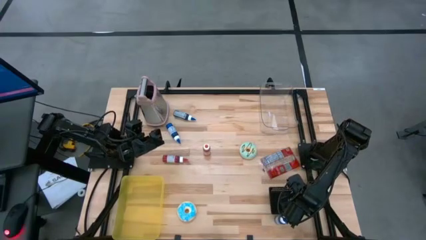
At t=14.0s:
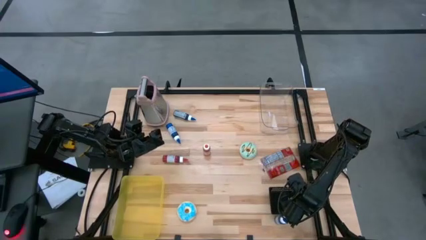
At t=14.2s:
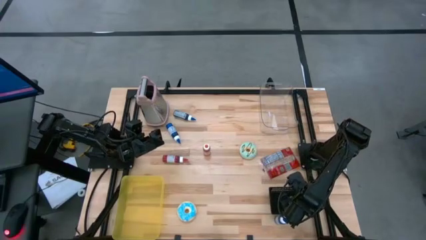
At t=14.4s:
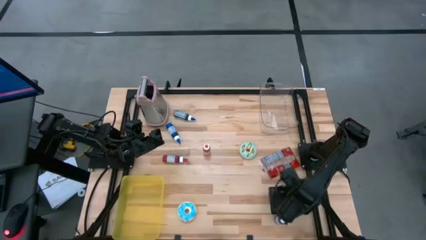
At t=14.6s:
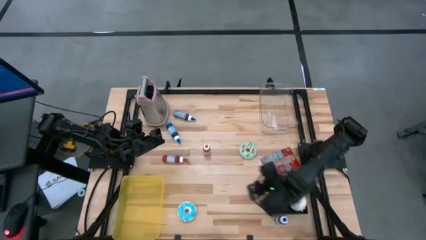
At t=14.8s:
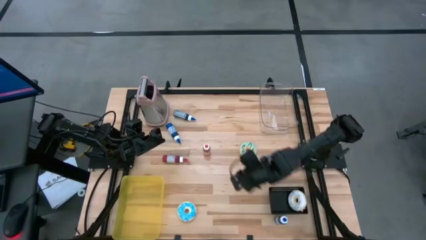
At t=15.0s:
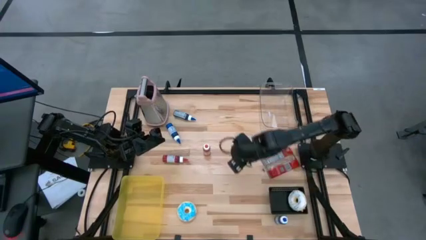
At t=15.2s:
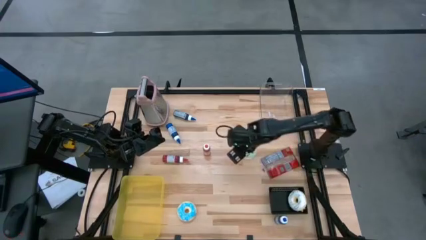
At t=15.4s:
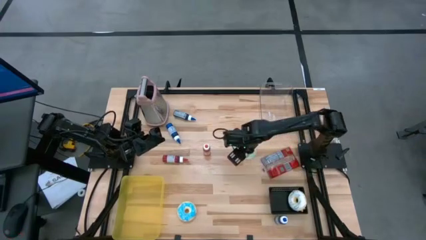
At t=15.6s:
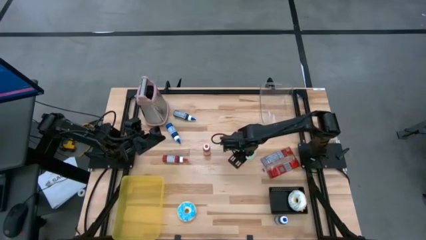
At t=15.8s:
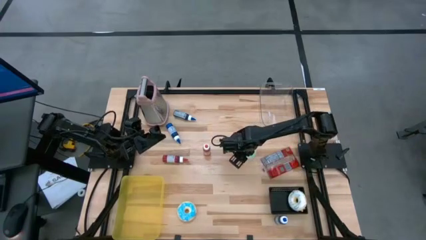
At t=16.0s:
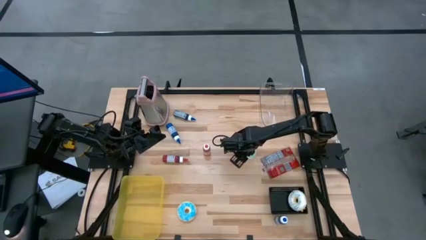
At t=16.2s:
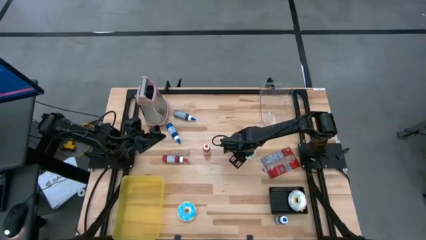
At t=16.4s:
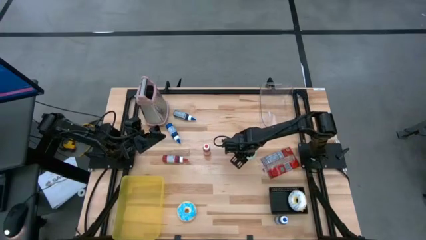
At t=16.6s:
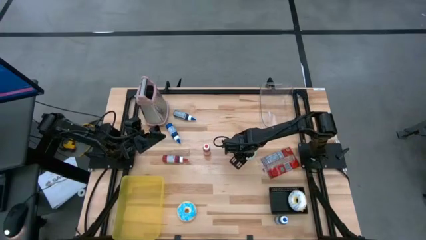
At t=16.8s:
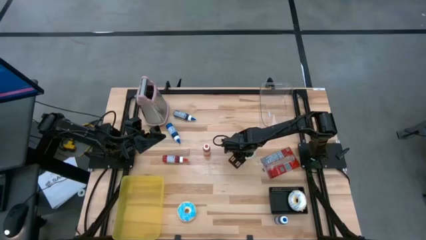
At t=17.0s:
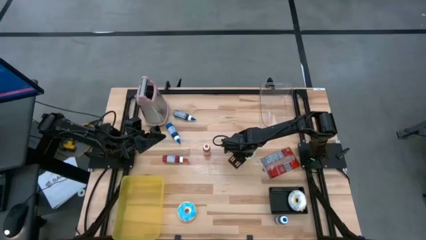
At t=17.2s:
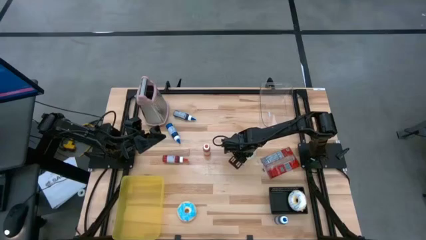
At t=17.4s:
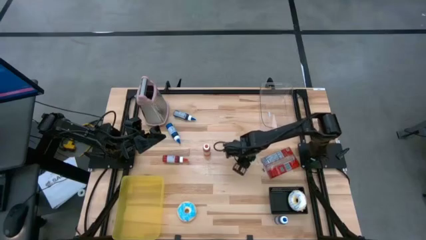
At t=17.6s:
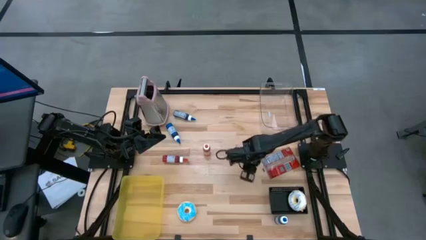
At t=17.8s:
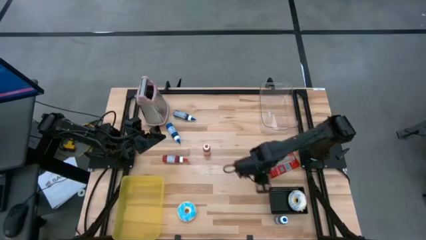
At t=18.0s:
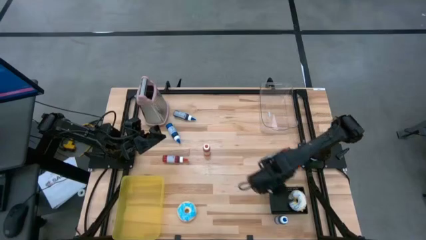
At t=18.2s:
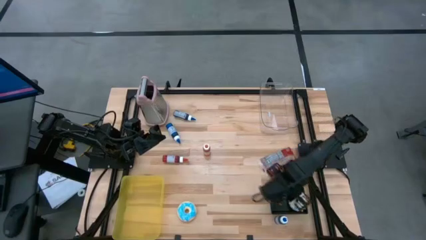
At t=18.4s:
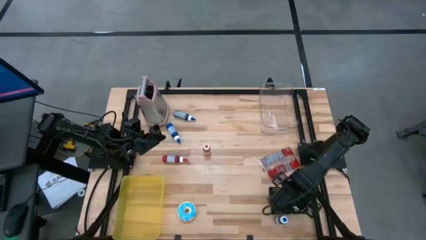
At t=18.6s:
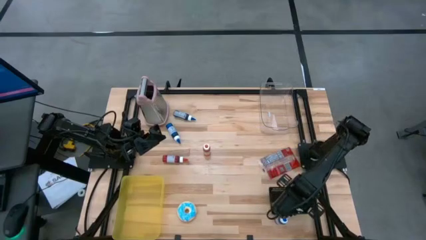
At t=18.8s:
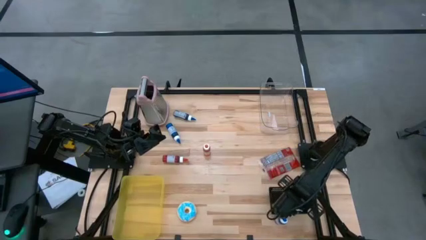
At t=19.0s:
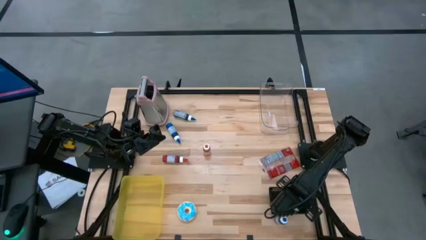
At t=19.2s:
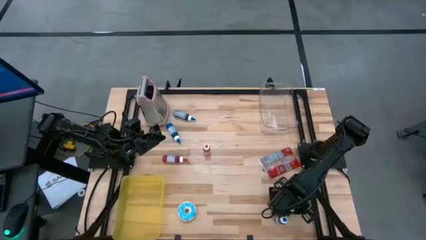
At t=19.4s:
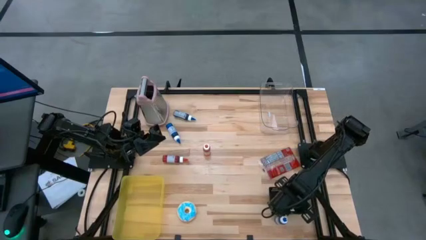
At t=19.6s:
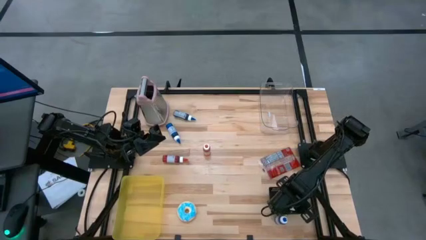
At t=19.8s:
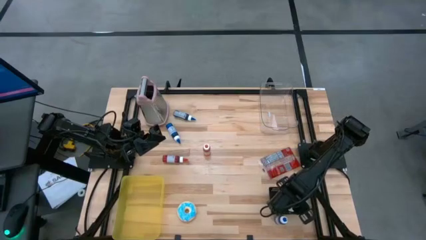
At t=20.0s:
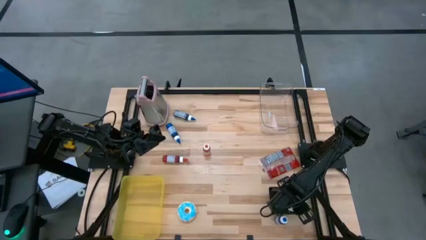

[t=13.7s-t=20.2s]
Put the green donut into the black bin

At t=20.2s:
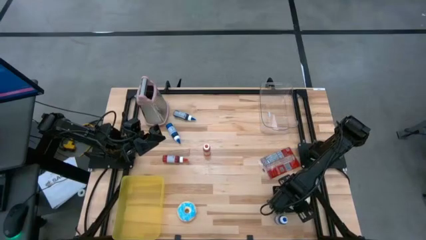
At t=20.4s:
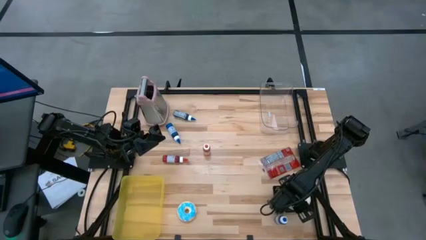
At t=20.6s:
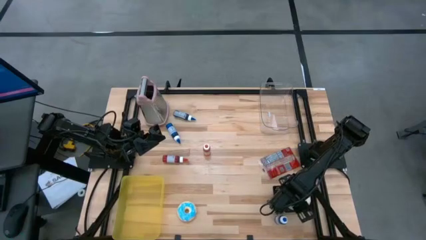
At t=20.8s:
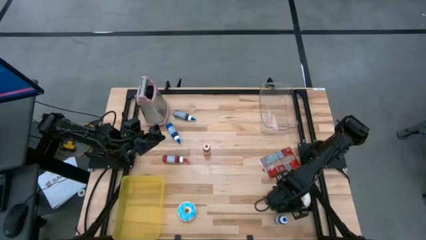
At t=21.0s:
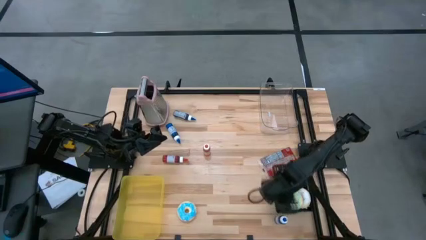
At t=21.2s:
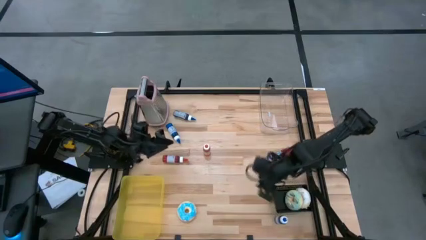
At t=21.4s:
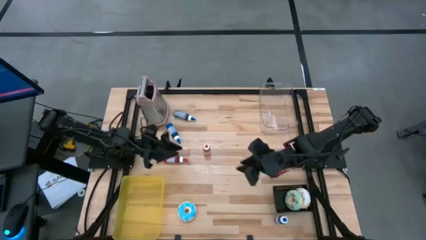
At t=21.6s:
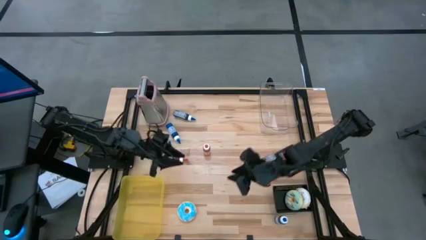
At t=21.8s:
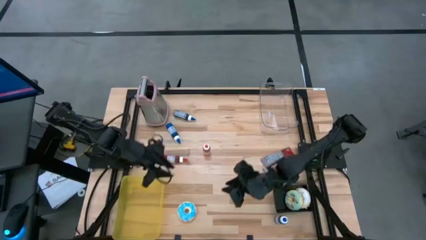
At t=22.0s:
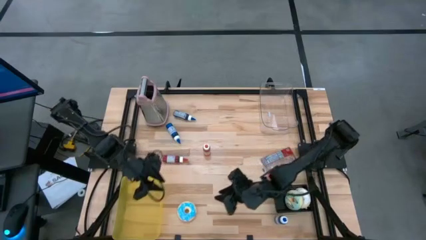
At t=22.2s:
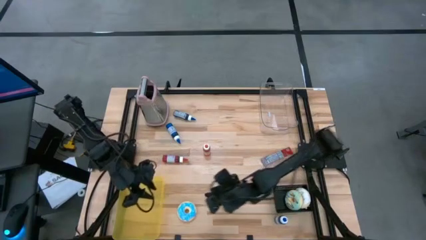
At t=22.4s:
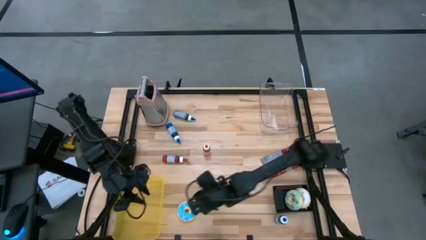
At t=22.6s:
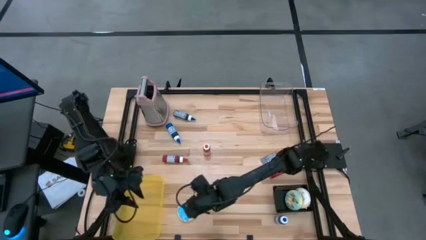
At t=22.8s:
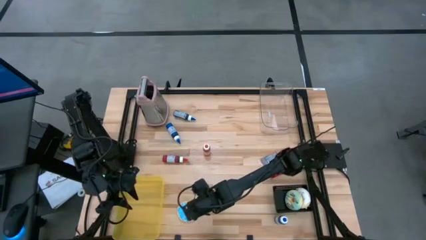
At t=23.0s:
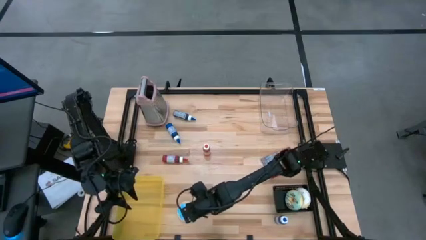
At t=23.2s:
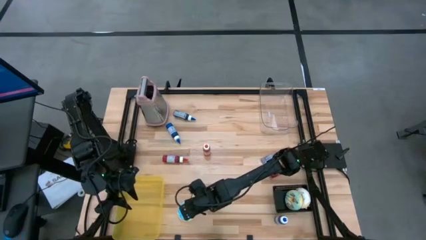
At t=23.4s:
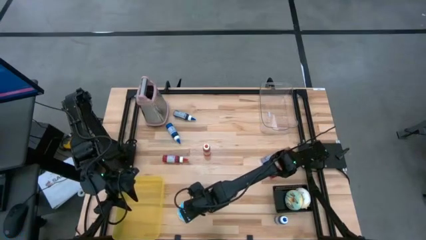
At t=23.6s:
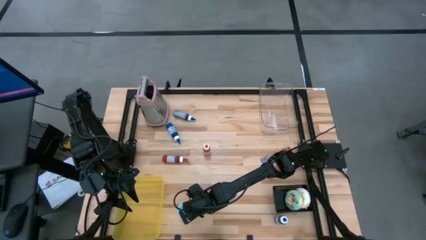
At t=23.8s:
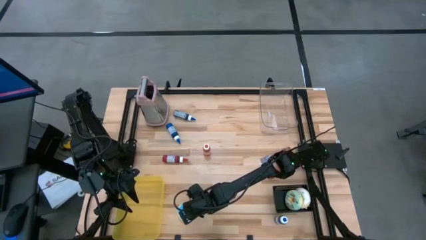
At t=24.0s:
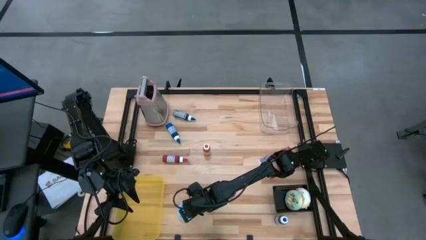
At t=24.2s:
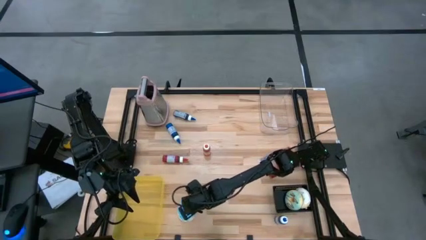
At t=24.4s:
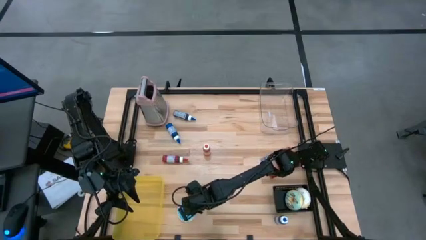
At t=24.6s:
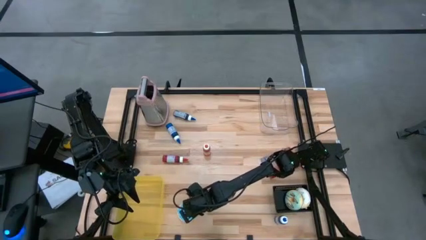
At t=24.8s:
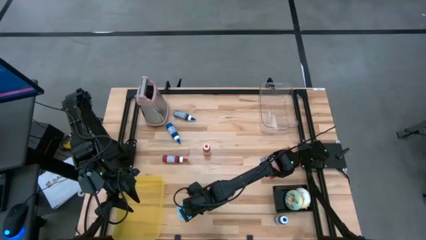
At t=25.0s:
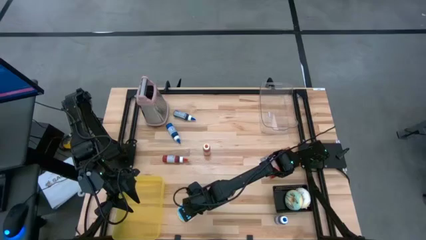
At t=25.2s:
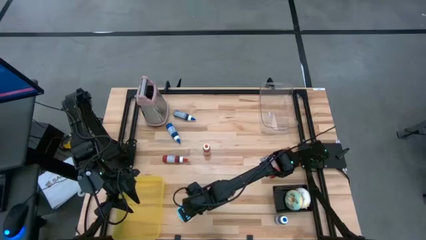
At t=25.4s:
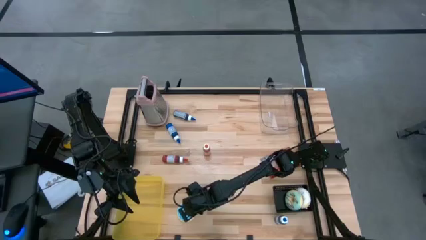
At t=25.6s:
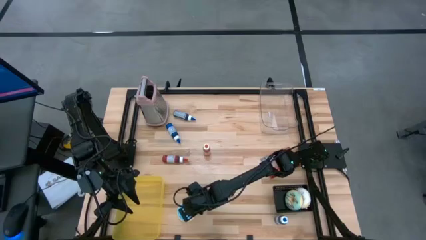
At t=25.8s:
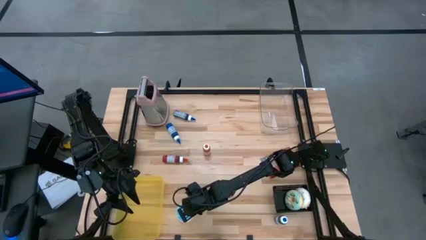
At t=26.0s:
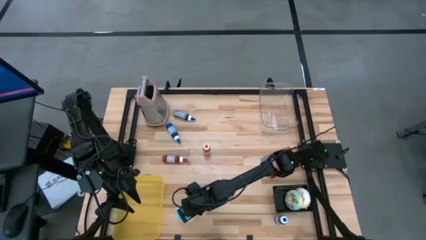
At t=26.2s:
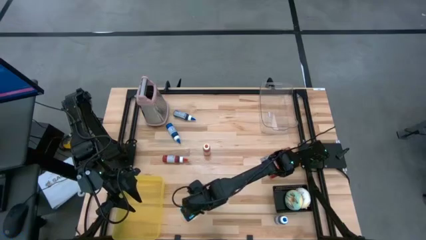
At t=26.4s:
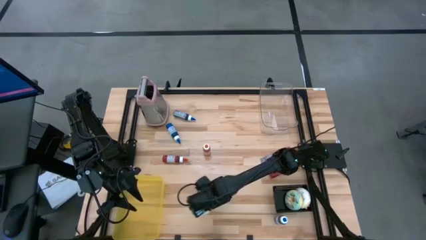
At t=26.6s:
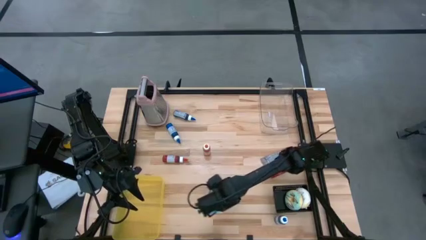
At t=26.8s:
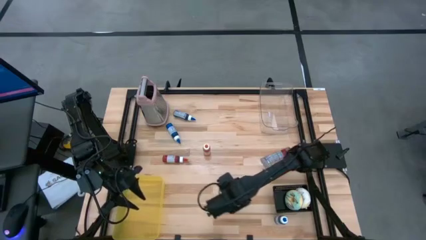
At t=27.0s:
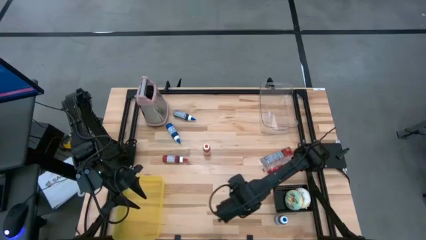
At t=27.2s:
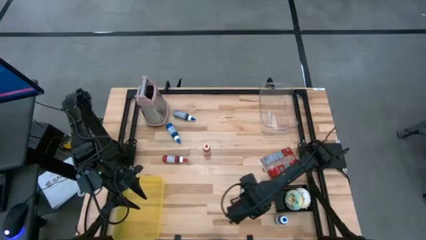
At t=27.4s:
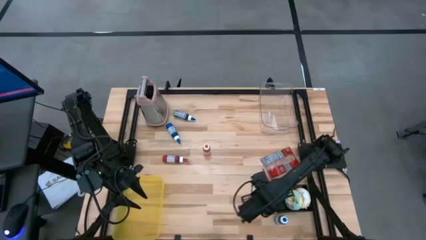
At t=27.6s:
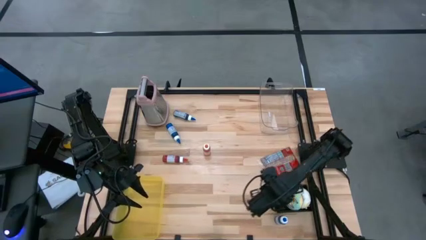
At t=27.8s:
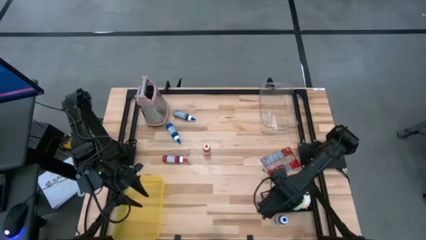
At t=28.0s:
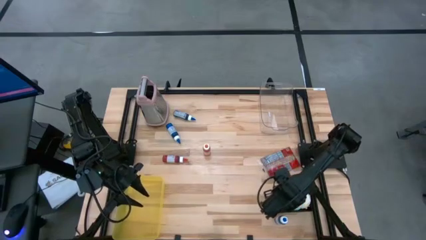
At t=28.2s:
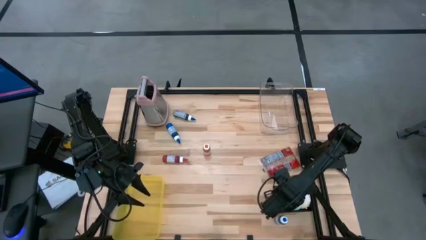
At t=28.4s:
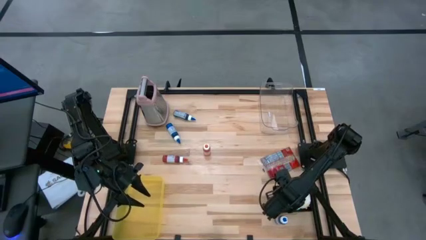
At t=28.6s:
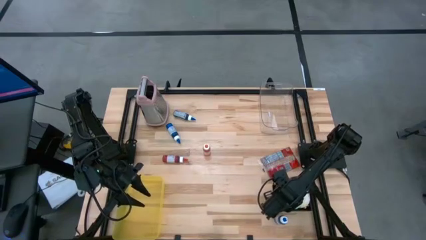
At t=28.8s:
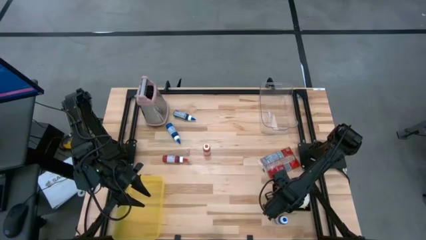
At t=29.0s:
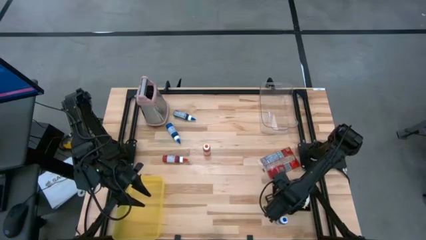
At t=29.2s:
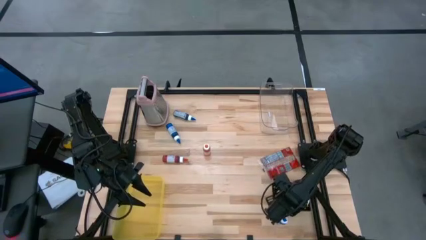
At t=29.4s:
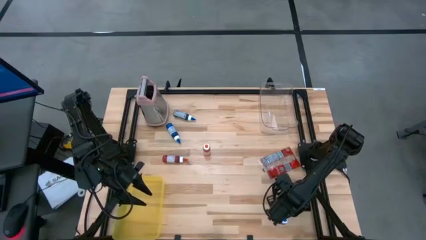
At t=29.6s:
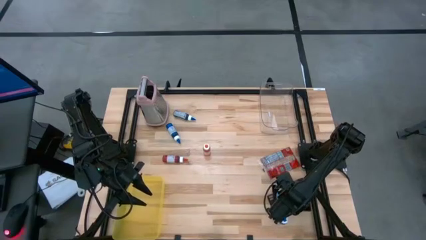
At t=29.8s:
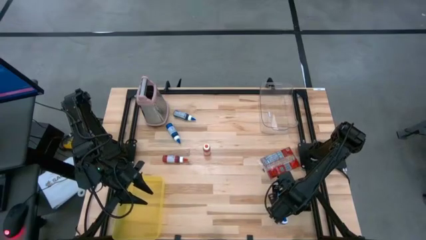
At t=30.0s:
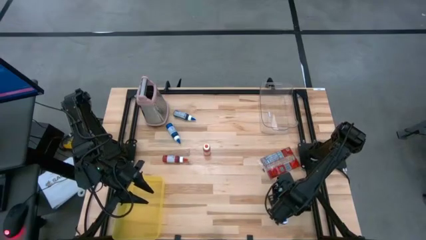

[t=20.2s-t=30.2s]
Put the blue donut into the black bin
